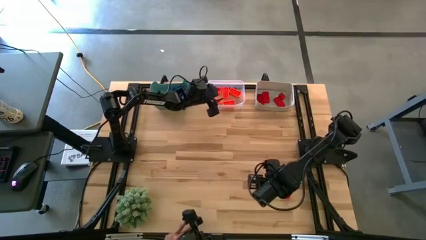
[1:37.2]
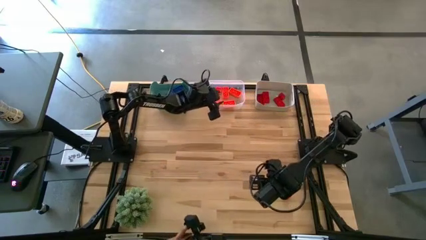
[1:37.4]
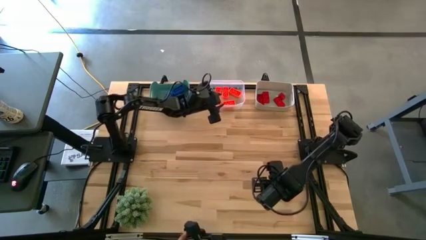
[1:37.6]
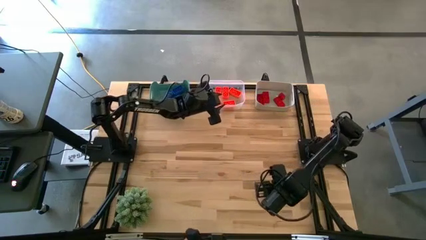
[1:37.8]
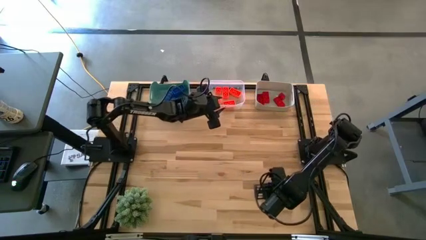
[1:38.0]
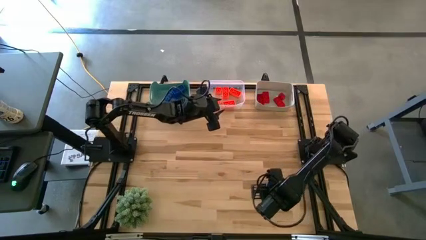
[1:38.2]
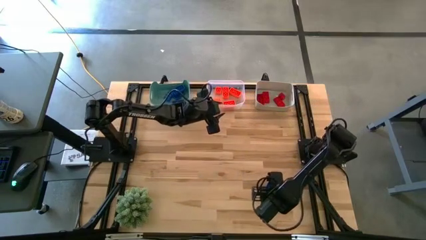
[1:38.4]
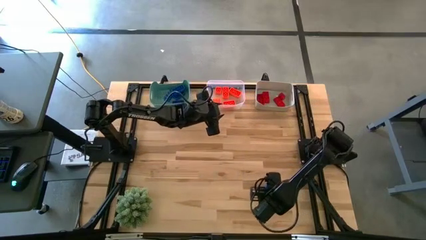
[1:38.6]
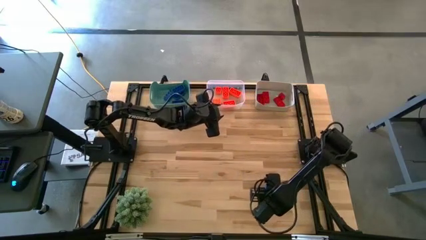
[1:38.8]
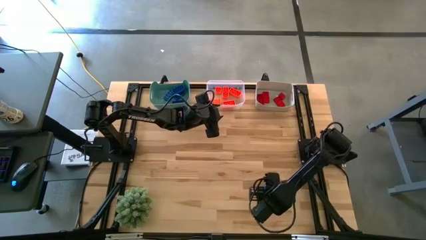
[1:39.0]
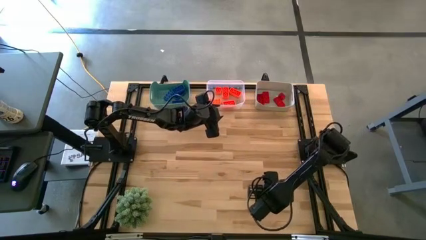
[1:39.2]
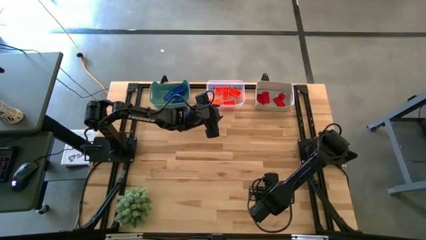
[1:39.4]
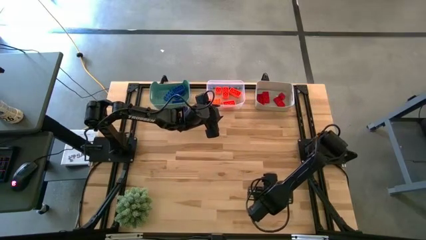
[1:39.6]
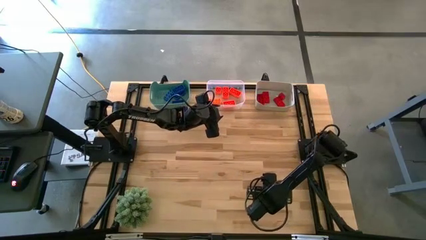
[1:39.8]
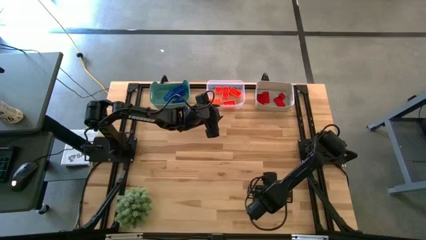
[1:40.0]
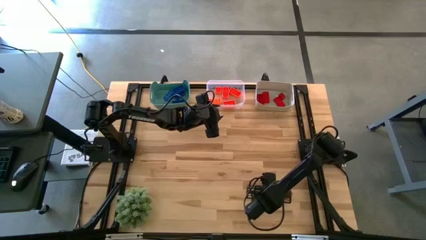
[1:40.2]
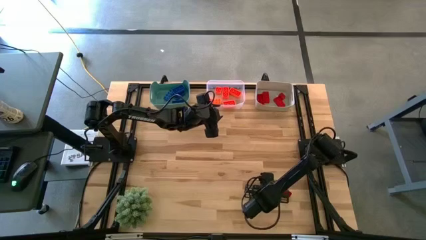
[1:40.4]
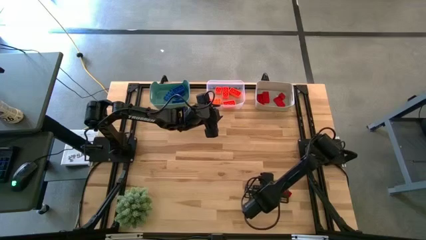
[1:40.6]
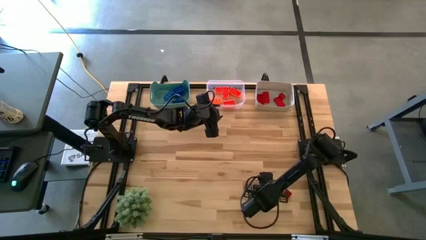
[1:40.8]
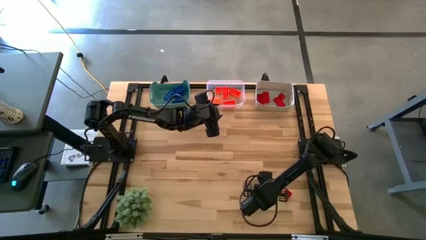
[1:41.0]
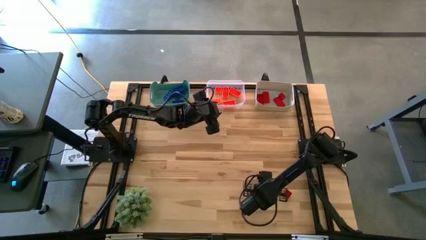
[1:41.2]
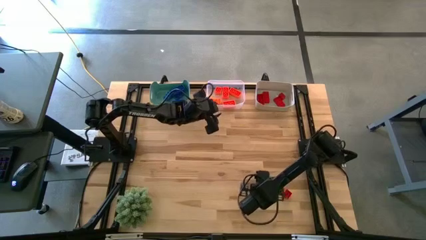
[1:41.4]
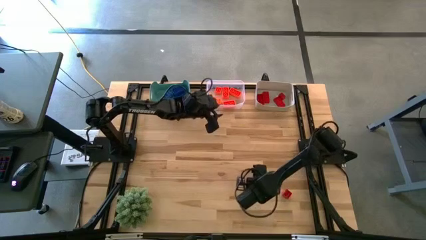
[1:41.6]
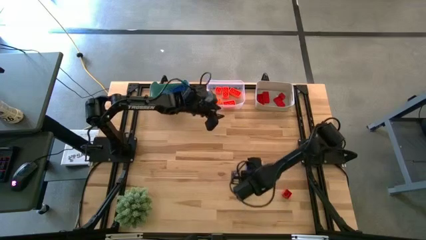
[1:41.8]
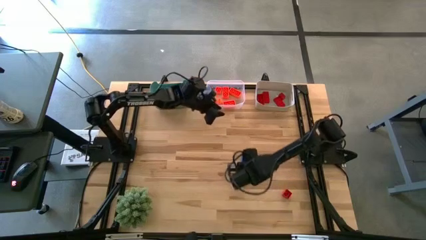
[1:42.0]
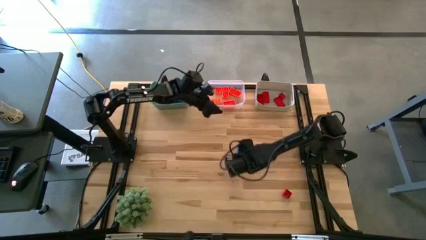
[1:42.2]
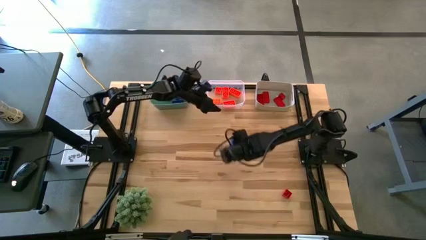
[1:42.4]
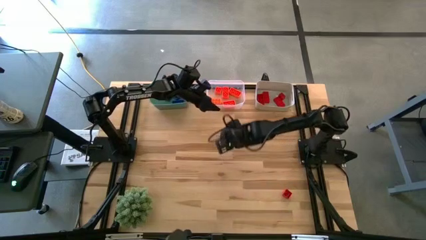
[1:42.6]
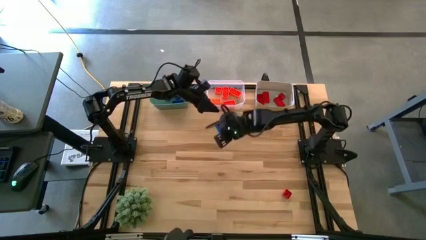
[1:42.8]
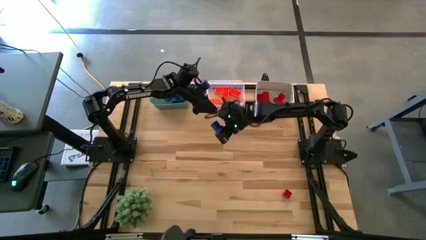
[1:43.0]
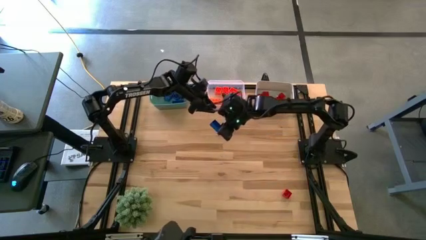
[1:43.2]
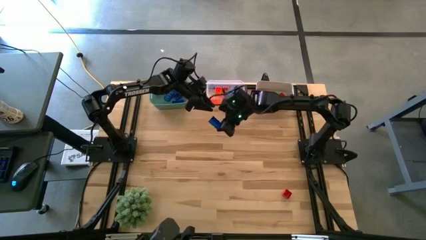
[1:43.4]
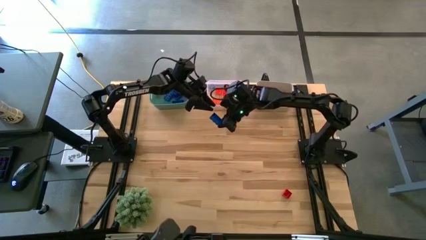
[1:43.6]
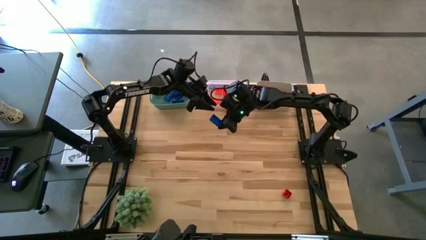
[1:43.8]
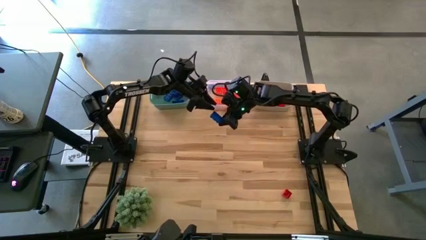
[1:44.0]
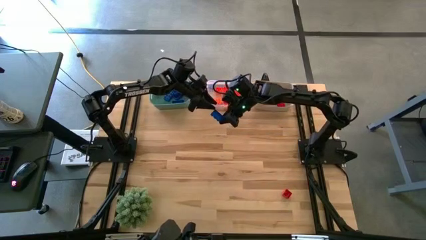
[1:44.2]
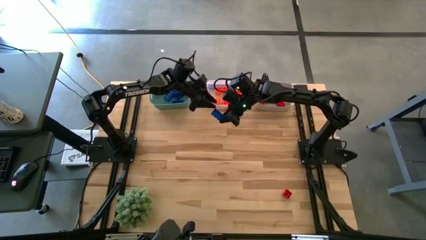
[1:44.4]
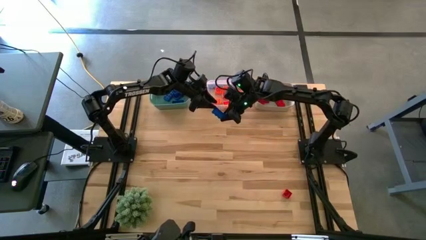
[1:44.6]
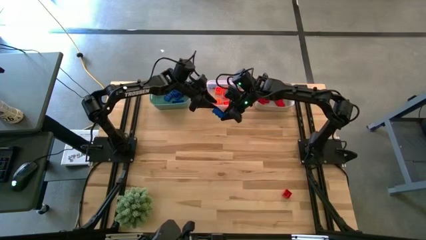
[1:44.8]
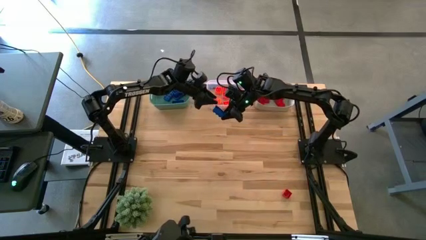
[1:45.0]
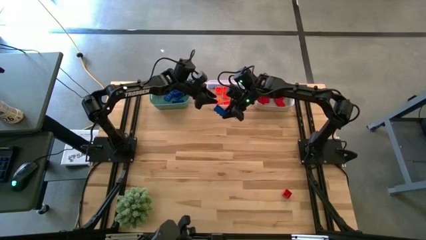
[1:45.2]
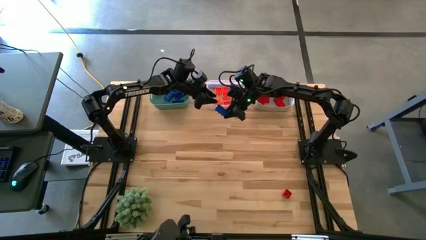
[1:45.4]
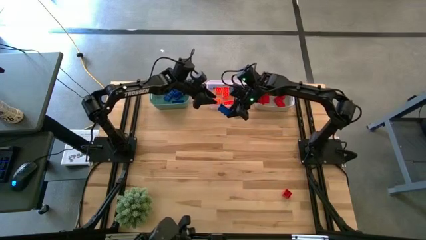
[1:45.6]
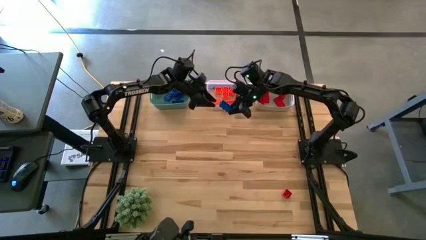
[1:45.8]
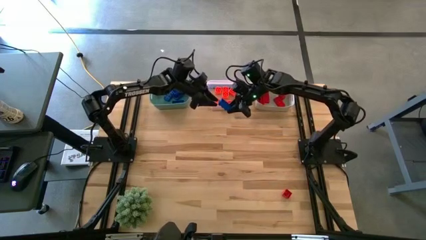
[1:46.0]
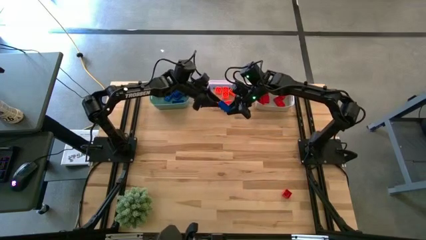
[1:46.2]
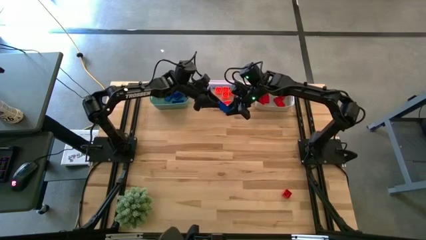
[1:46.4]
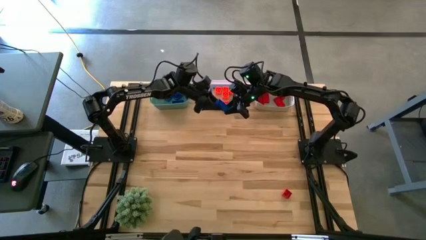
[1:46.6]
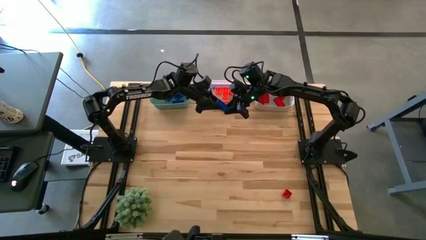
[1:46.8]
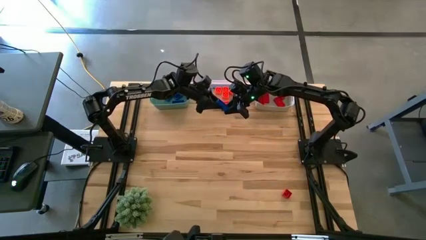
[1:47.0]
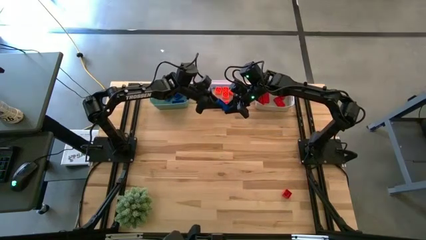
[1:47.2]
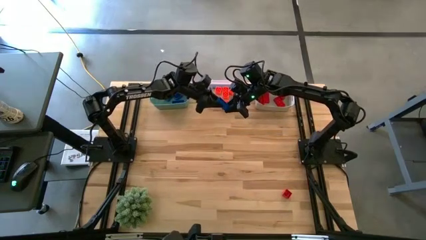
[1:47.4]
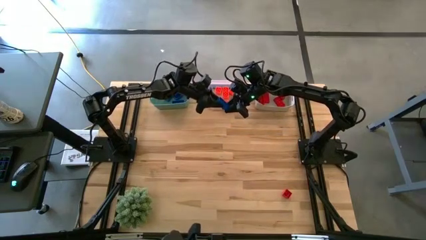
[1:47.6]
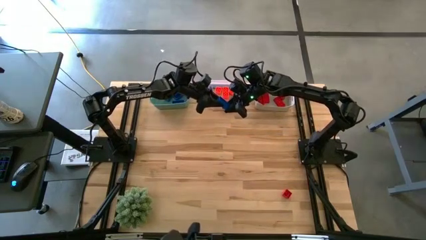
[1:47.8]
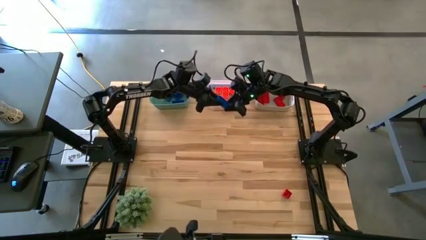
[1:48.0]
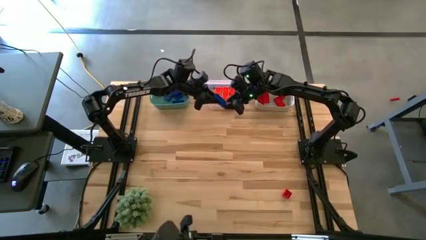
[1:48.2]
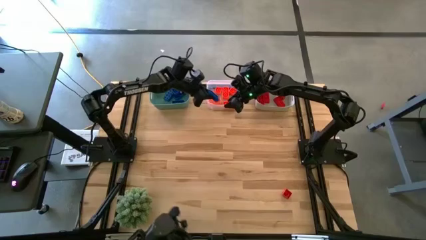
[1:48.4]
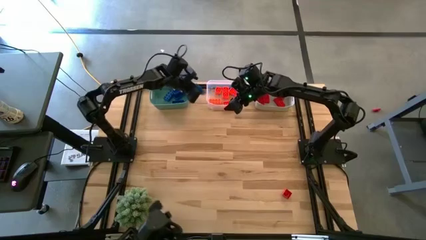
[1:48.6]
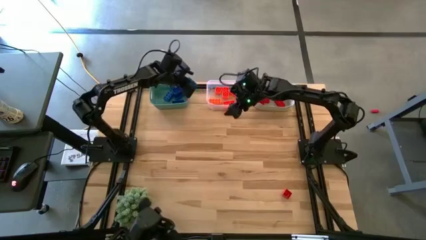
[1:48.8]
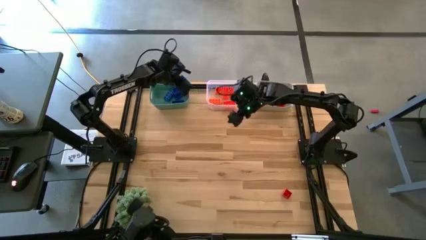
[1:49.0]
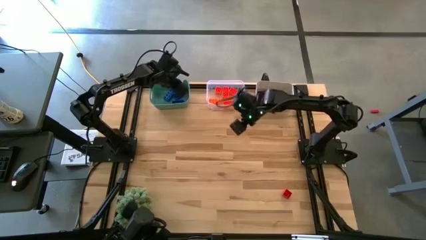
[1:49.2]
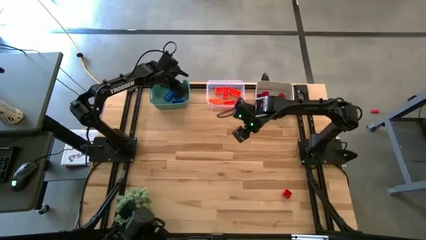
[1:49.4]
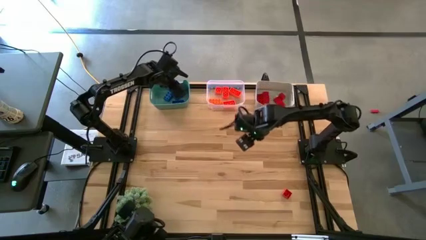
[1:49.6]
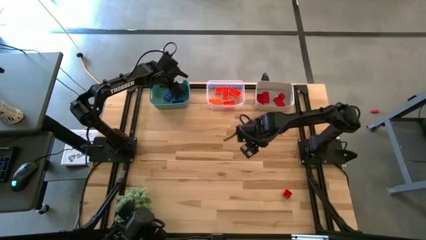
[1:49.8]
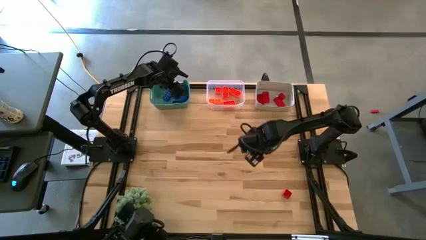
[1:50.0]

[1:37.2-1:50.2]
Task: Sort & place blocks by color
Put the blue game piece into the green bin

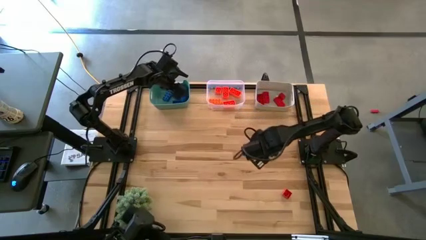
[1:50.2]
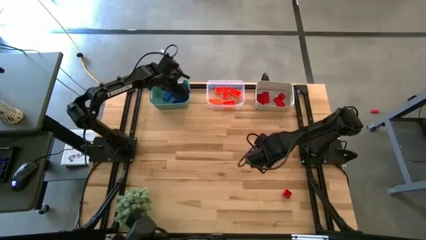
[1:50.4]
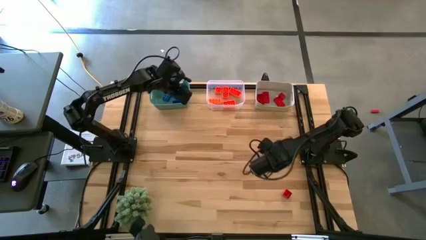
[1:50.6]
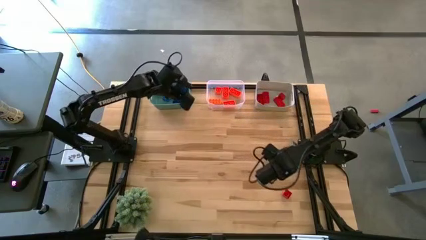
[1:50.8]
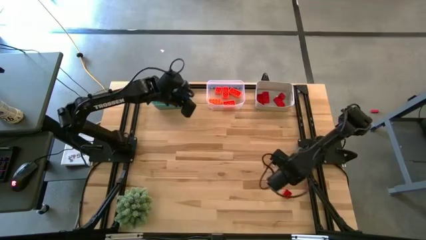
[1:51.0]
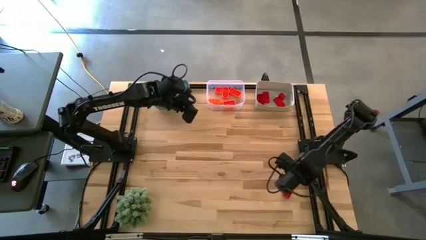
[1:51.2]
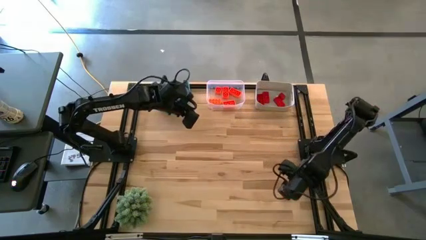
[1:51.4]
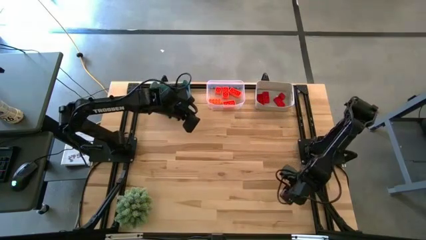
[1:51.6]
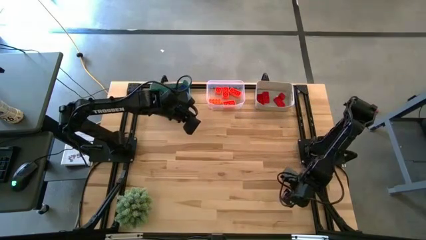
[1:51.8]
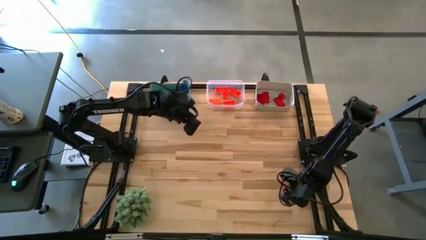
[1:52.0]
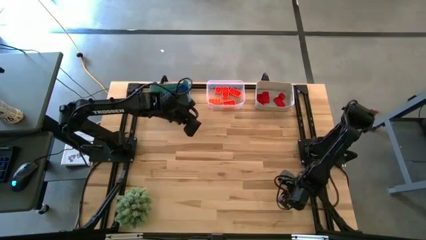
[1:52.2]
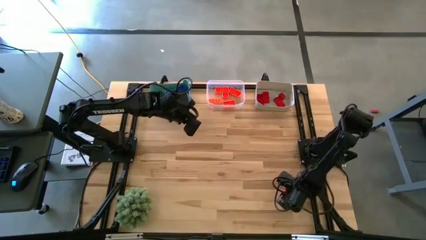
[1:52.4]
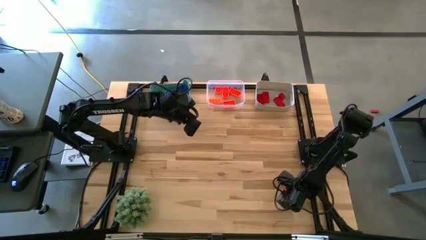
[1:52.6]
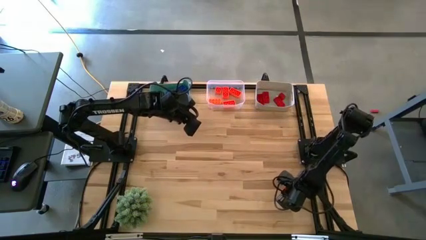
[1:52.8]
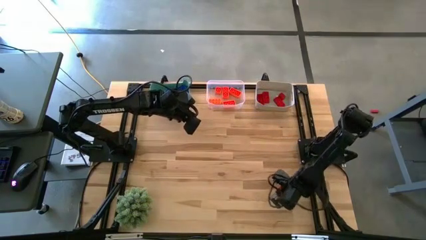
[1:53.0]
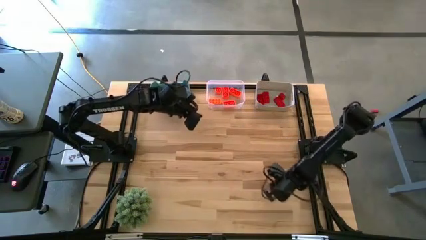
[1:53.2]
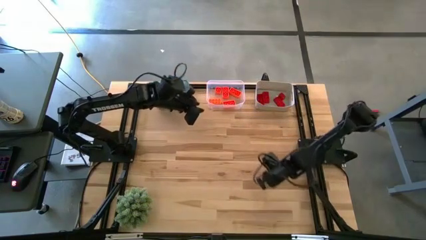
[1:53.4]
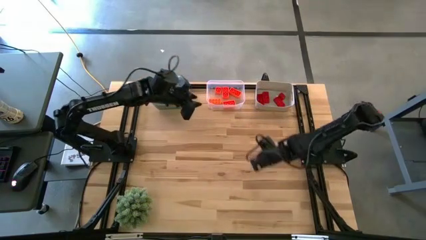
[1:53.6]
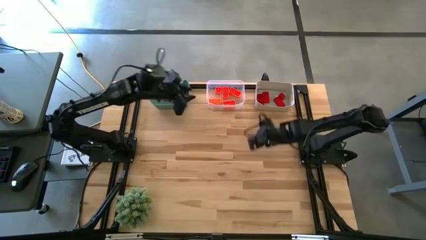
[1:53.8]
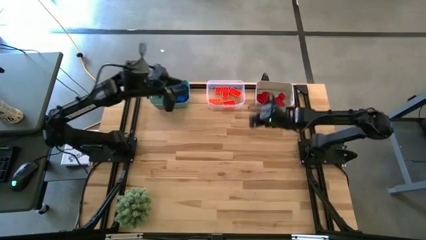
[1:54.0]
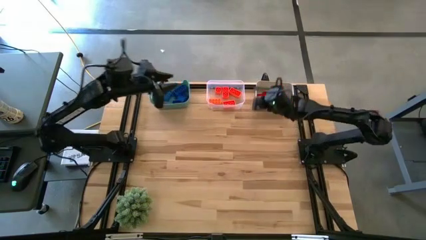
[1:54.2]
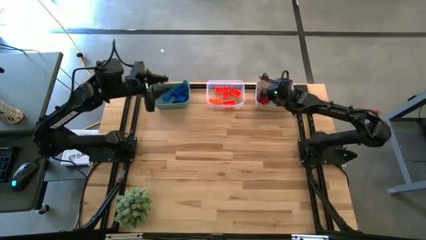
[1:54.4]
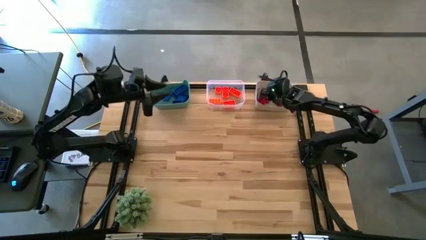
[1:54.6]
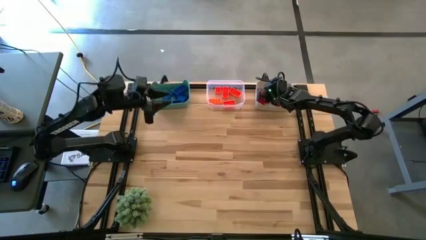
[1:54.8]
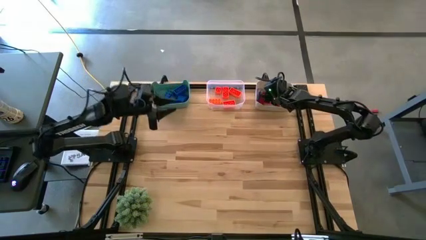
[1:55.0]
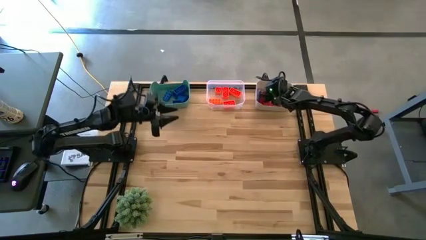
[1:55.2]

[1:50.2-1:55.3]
Put the red game piece into the gray bin
